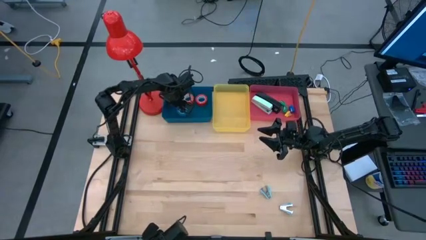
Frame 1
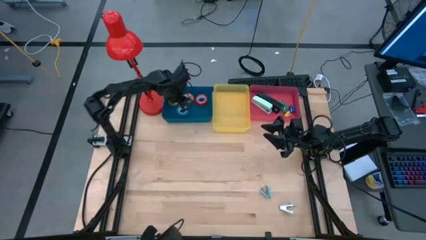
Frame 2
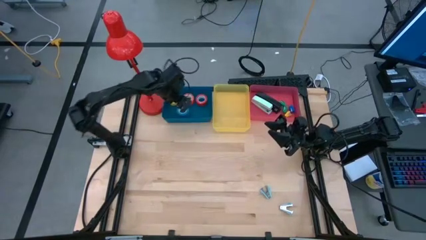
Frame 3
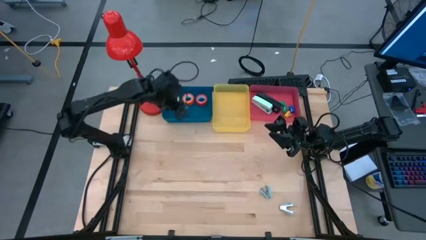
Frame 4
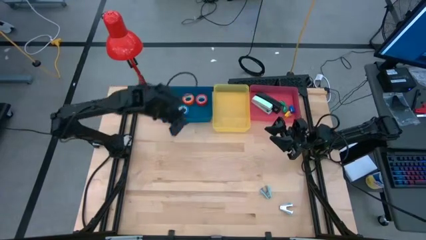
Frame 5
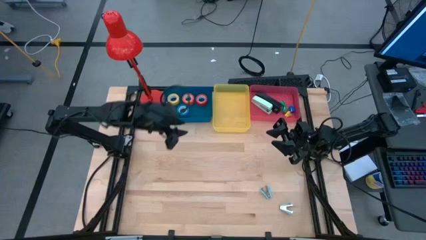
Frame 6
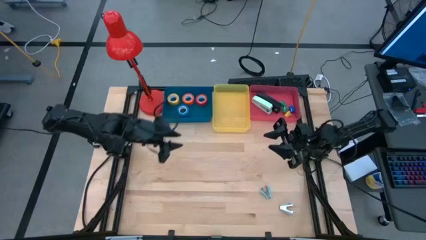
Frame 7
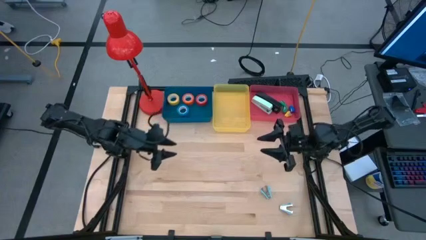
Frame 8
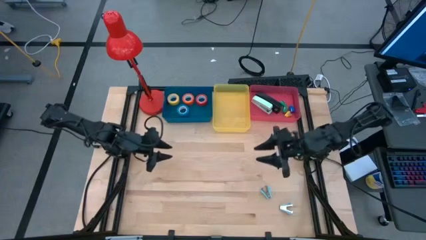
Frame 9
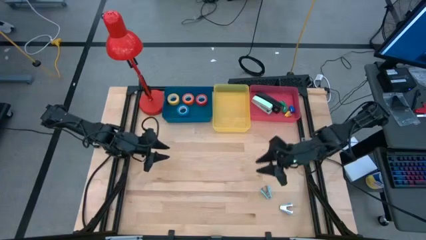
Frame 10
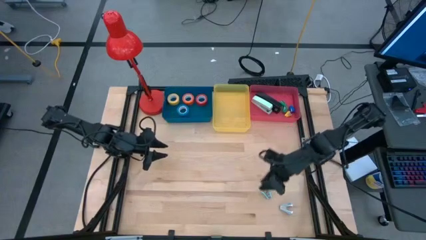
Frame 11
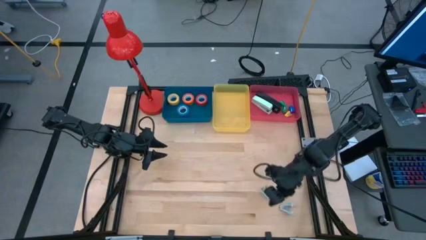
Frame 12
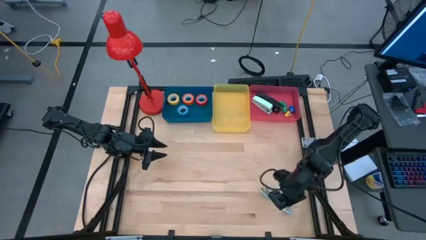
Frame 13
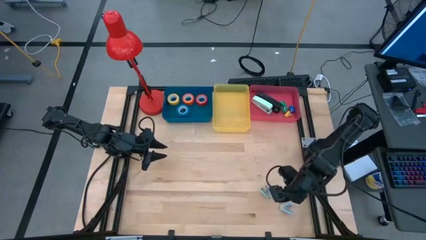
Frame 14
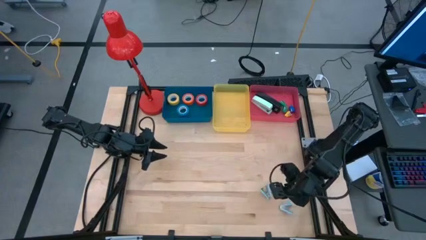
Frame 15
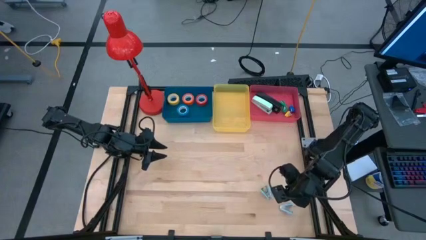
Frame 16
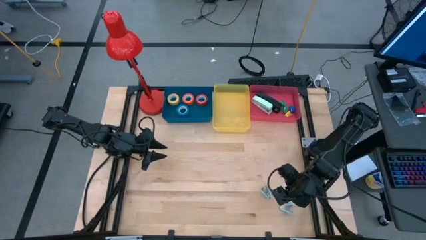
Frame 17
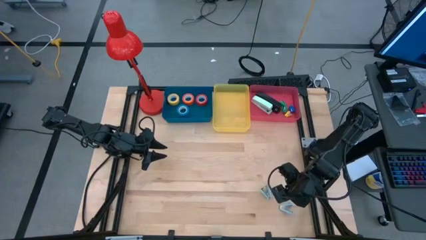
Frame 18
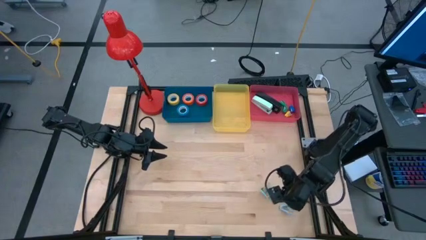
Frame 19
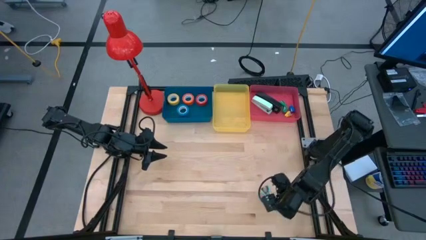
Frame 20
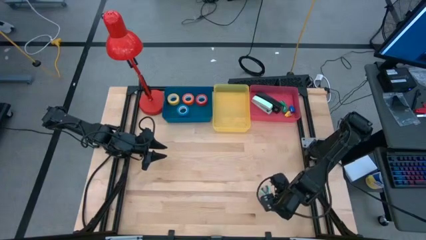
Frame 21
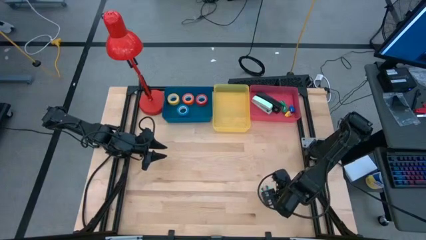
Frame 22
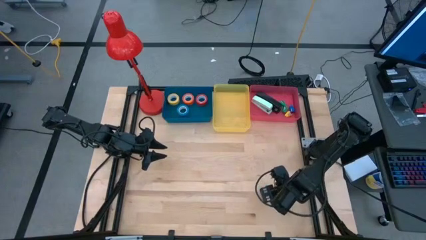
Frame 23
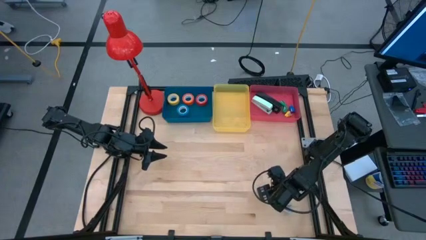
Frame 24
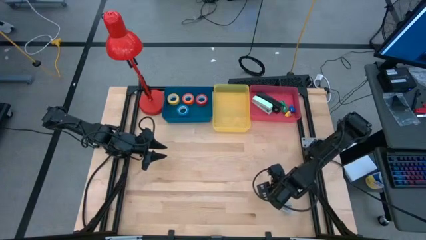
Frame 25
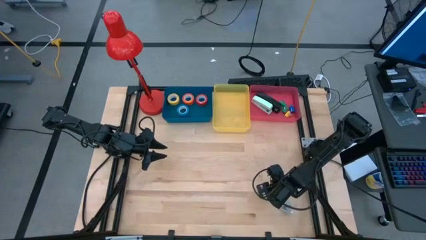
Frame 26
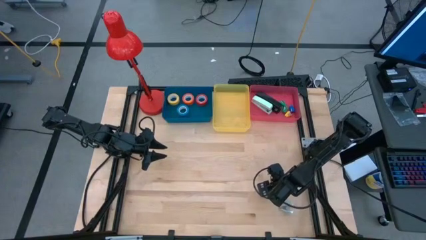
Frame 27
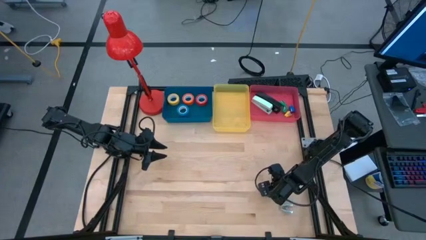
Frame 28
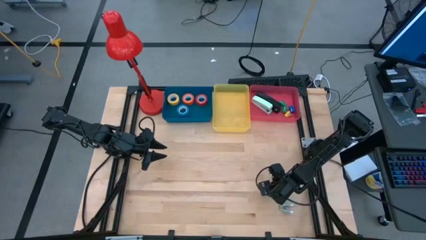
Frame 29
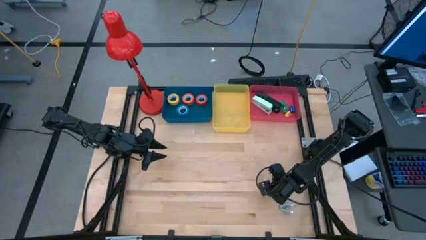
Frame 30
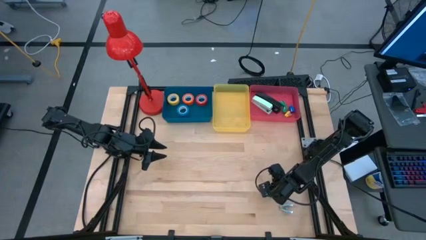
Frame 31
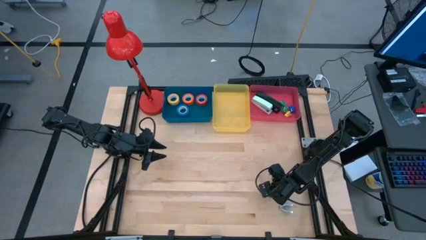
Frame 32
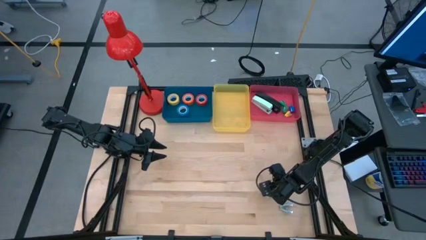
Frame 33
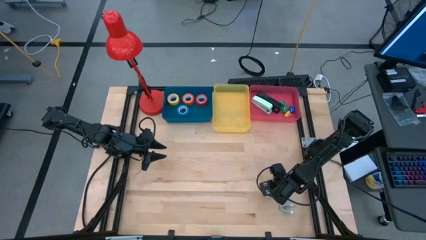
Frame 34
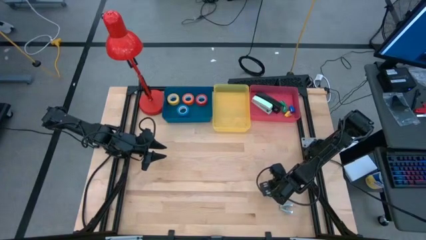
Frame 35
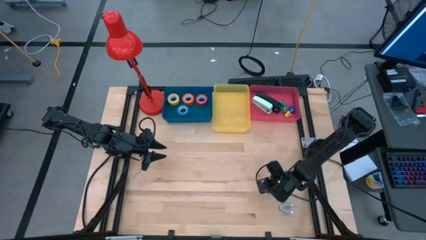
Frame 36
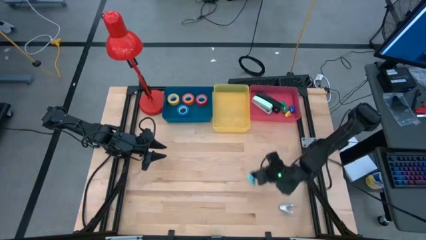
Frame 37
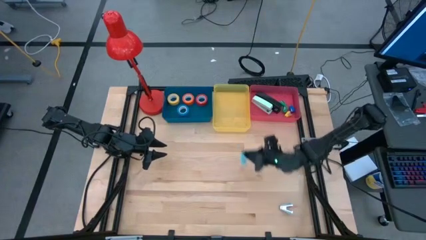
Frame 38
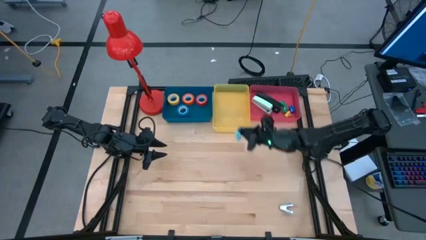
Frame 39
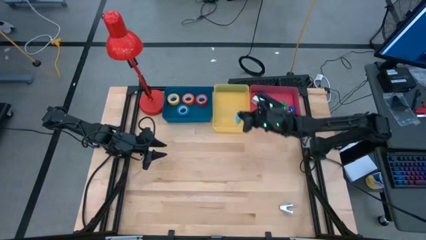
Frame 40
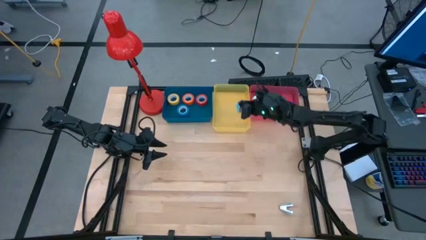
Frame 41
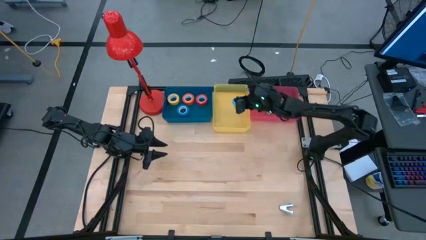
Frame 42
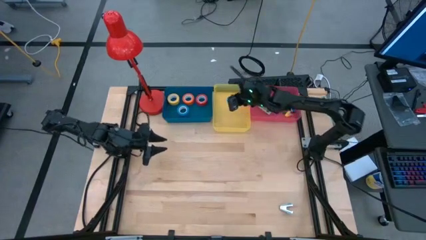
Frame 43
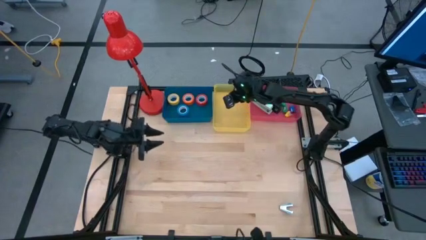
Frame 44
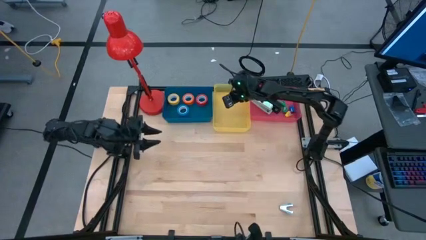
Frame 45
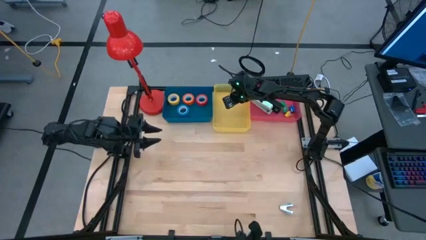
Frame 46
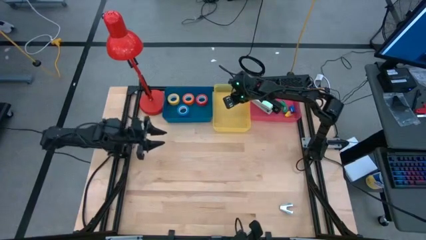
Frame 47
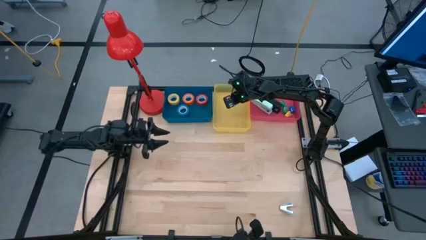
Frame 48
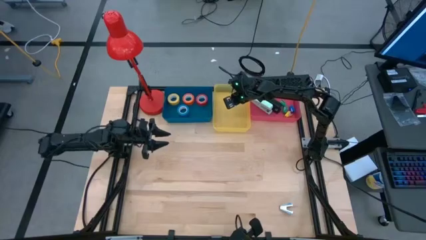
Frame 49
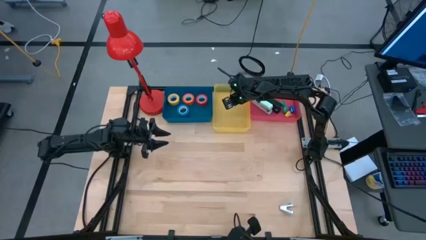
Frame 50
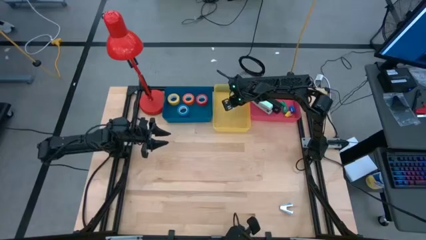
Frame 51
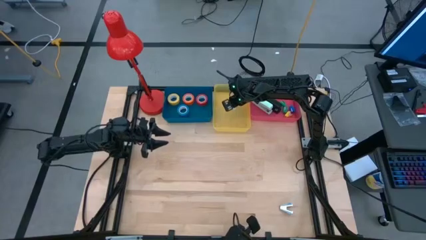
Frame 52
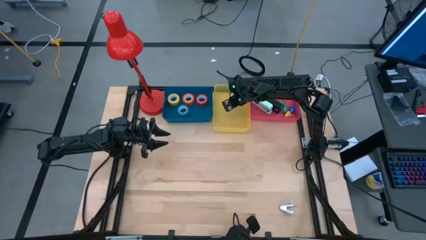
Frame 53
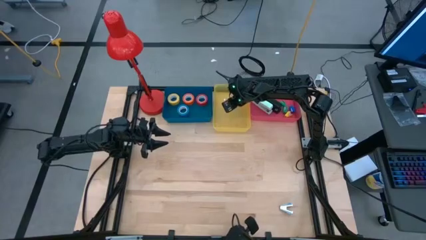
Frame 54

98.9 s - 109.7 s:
Task: Pick and place Stapler, Stapler remover, tape
Put the light green staple remover into the yellow bin

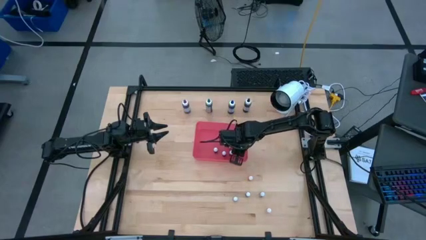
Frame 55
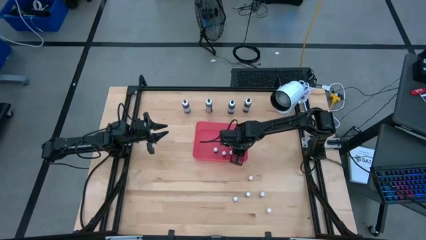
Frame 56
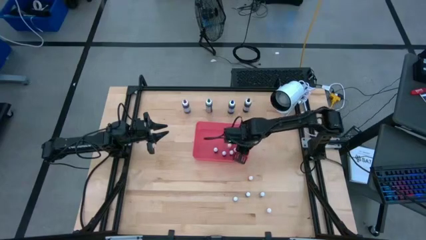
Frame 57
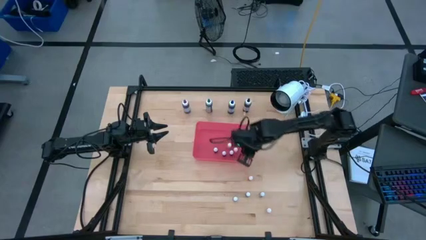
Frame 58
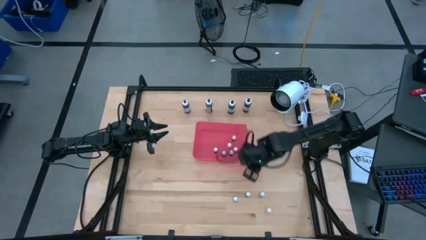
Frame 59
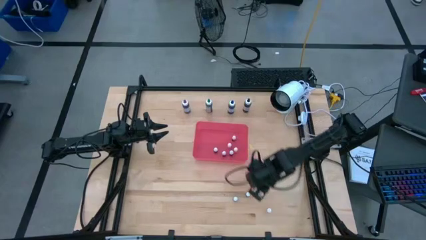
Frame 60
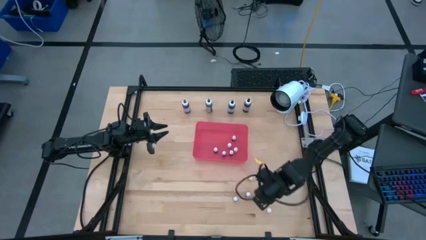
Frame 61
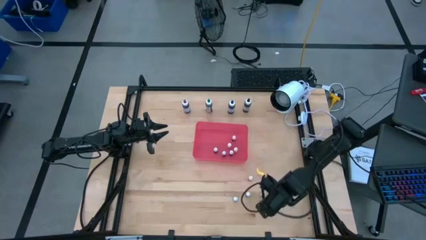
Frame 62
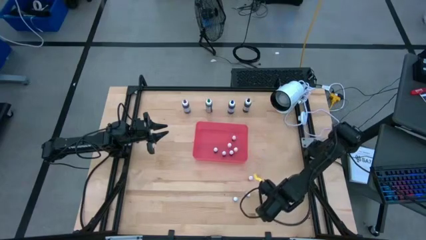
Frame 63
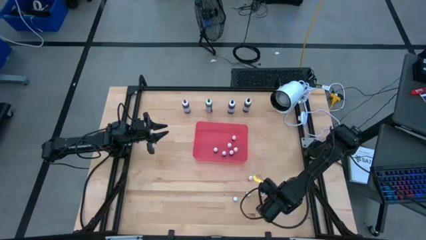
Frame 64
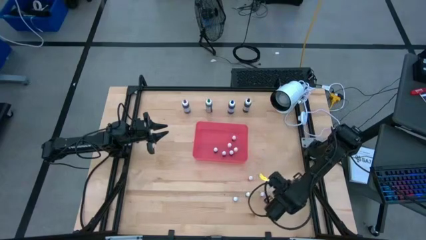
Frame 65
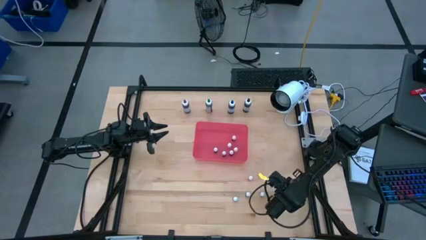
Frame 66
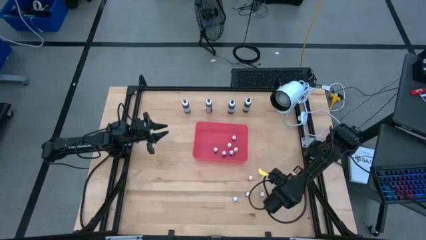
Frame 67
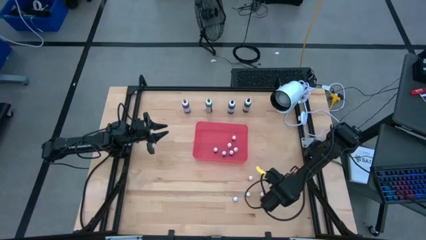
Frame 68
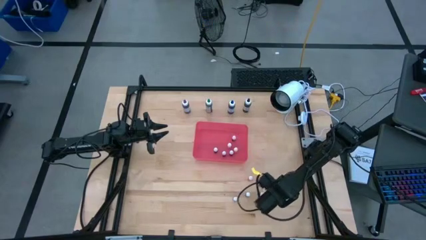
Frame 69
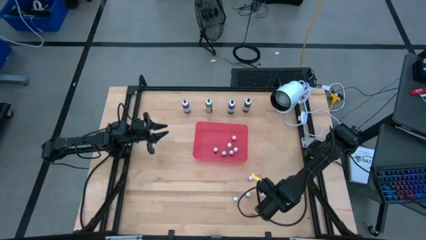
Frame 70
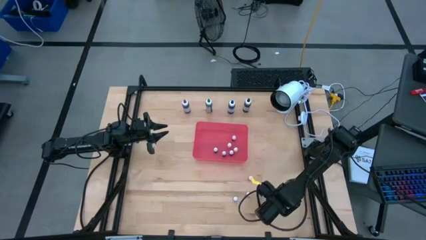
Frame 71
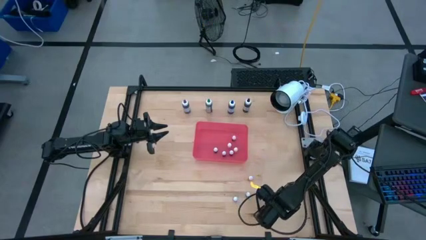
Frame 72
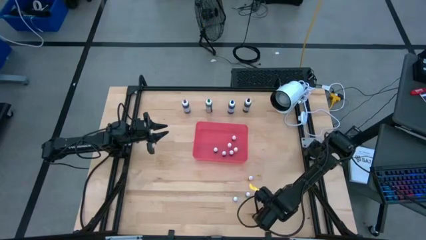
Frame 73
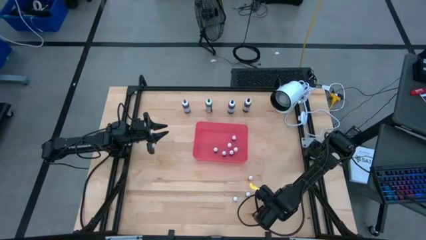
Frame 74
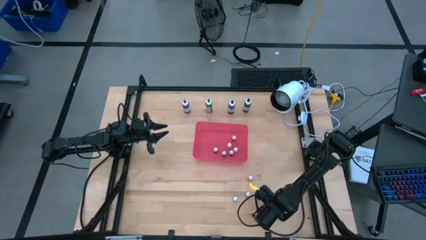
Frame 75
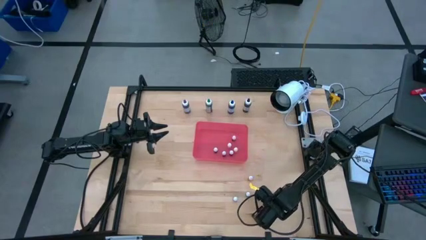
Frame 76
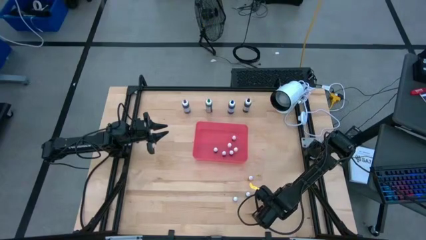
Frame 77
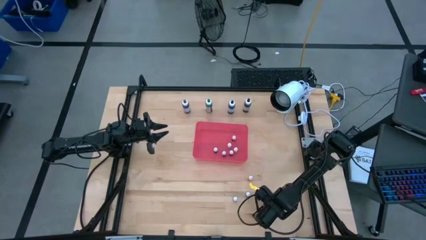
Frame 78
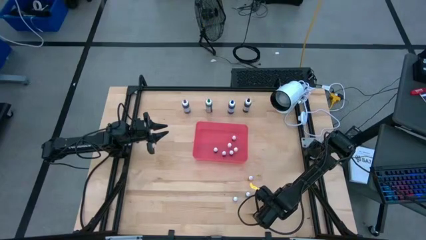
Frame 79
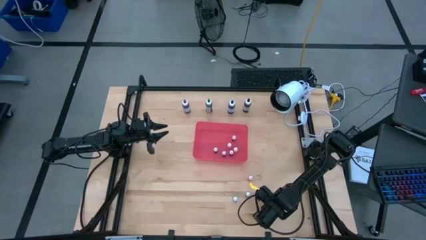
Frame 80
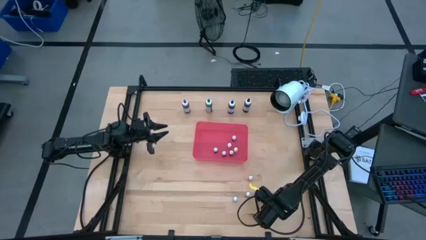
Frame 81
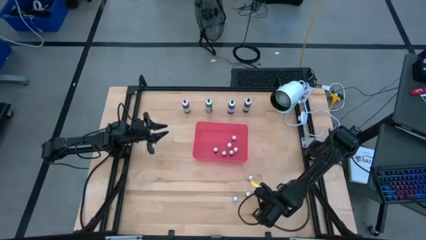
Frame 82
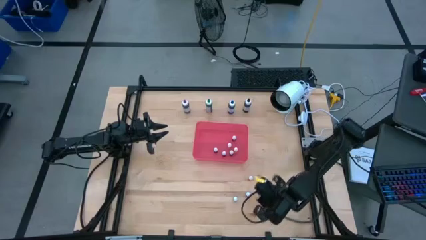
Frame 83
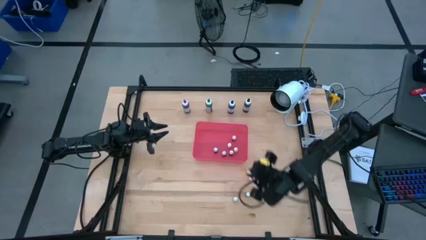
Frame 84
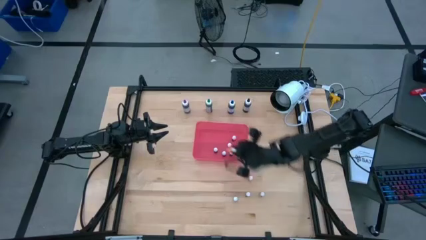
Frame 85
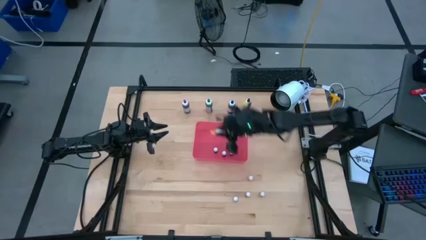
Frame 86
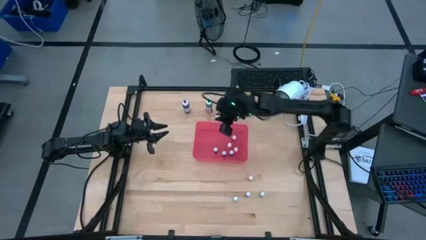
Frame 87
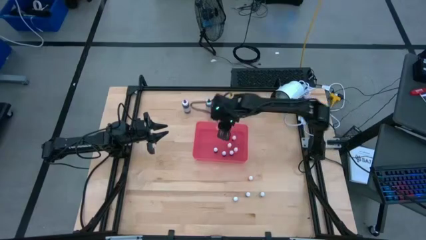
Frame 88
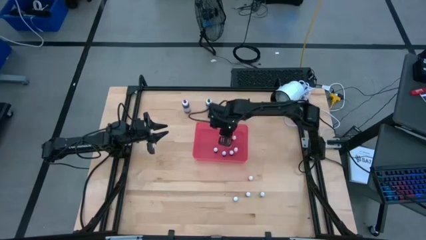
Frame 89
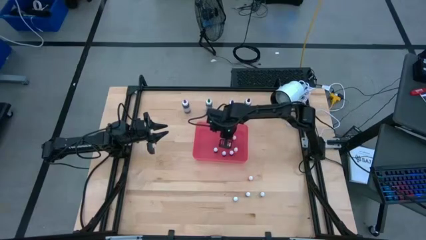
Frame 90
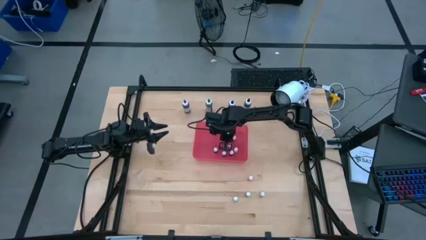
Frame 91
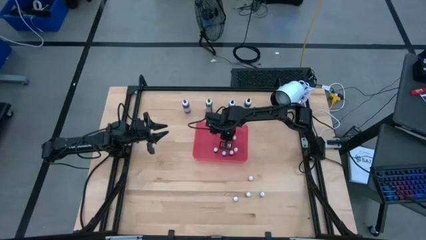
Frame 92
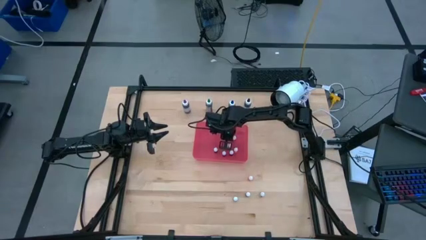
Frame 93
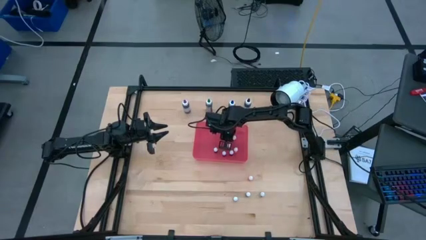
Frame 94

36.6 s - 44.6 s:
Task: Pick & Place food coloring
Put the small orange food coloring bottle into the red bin
